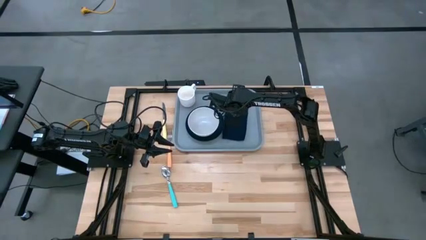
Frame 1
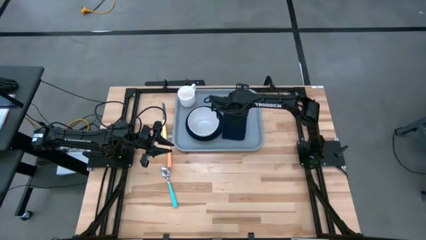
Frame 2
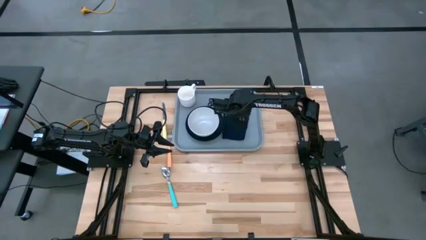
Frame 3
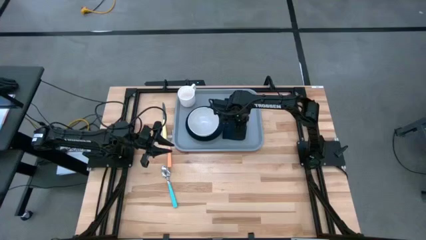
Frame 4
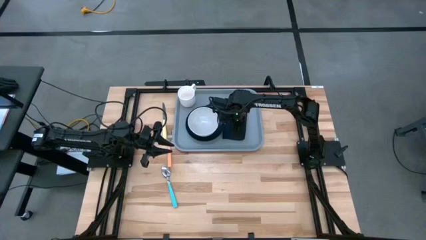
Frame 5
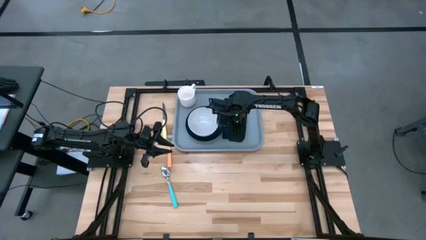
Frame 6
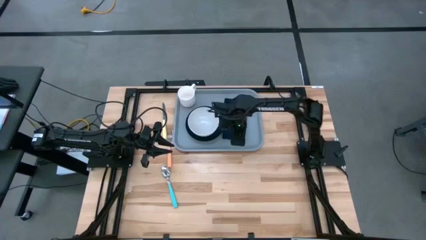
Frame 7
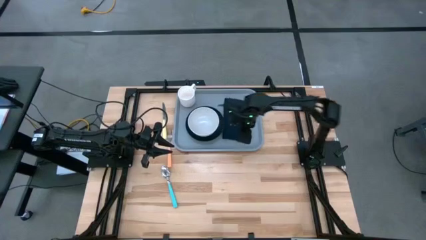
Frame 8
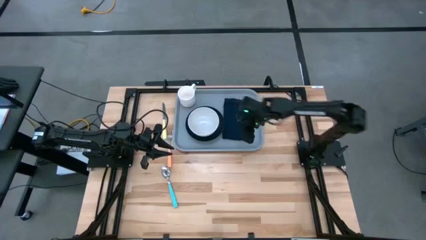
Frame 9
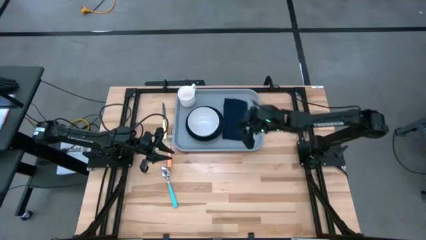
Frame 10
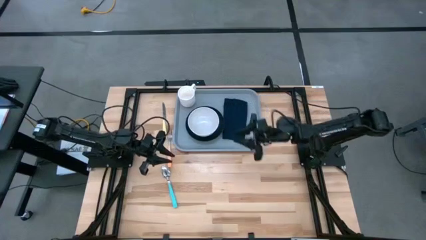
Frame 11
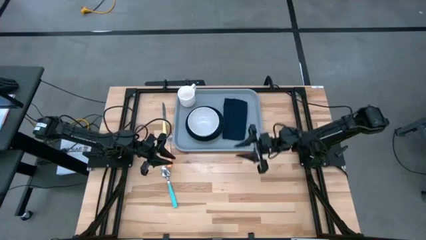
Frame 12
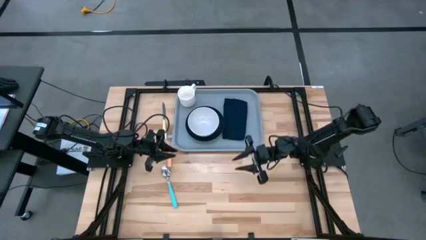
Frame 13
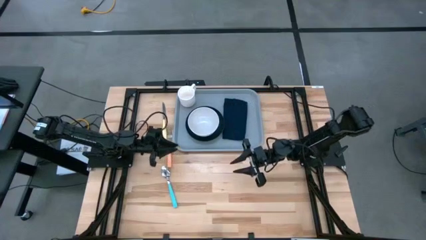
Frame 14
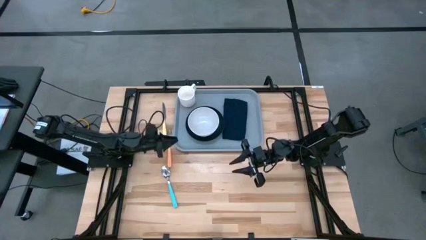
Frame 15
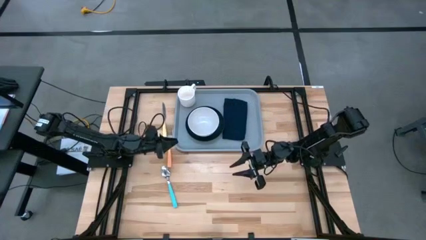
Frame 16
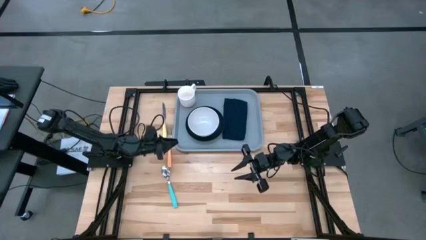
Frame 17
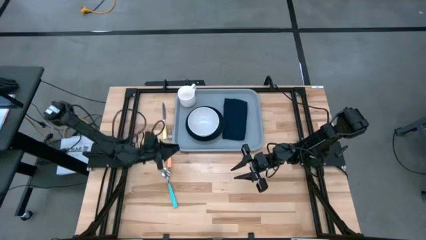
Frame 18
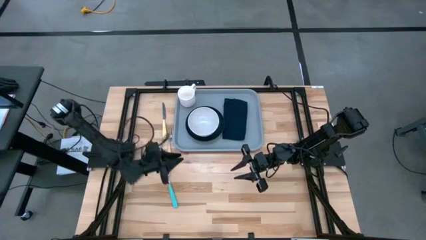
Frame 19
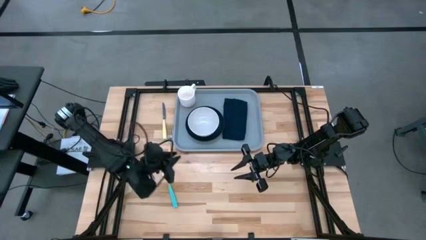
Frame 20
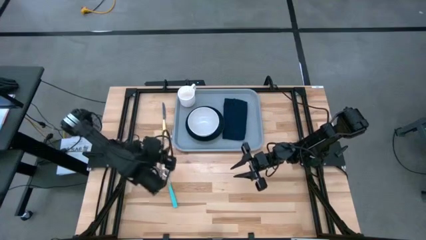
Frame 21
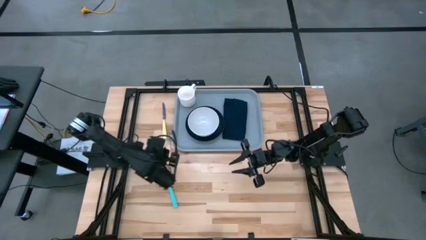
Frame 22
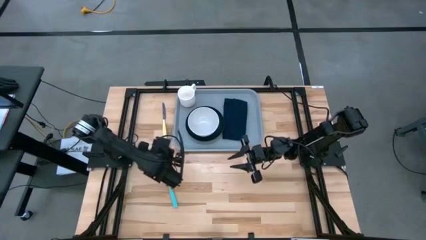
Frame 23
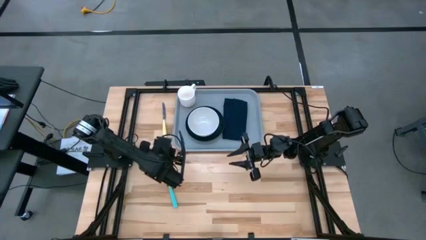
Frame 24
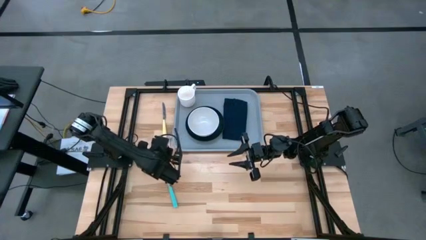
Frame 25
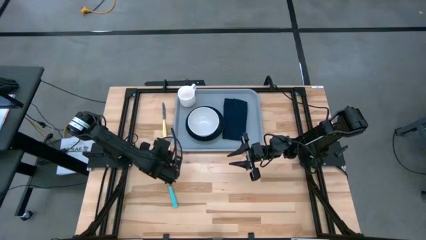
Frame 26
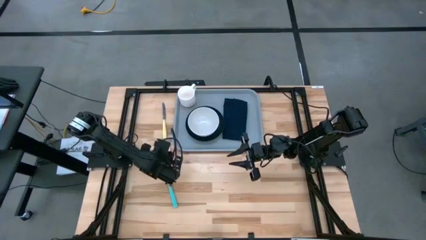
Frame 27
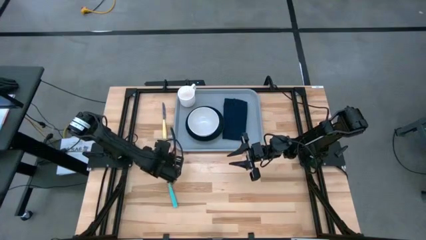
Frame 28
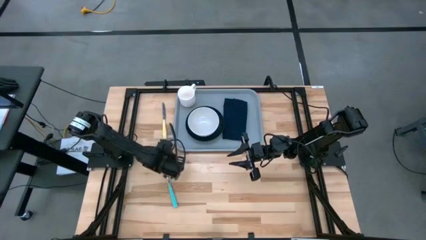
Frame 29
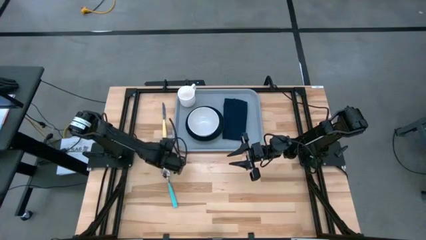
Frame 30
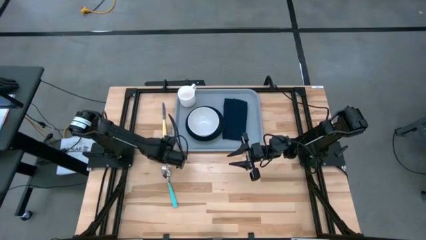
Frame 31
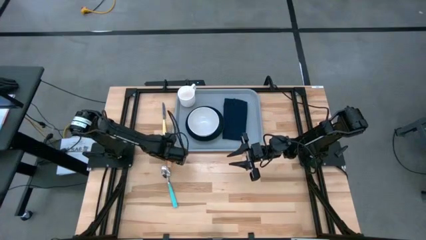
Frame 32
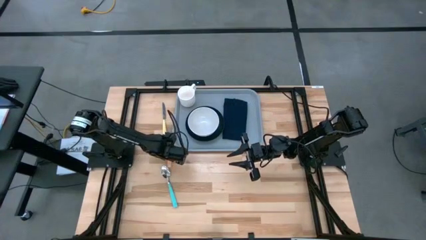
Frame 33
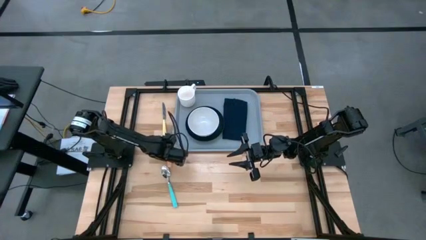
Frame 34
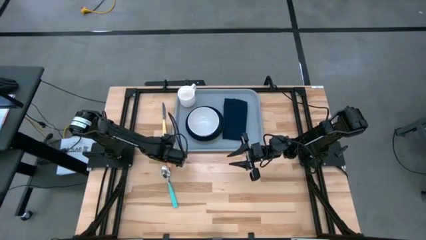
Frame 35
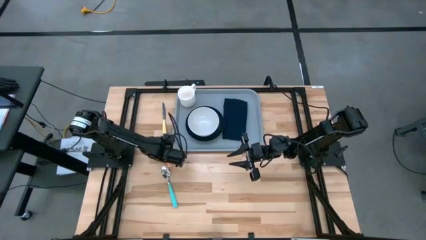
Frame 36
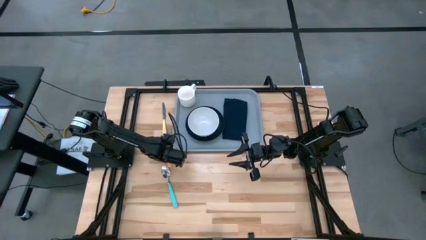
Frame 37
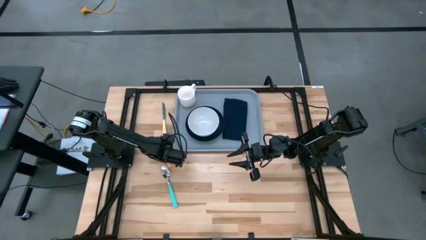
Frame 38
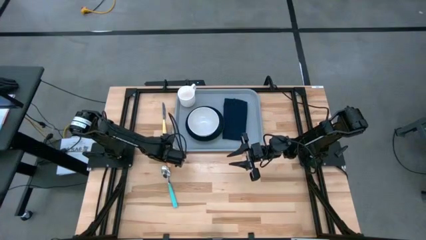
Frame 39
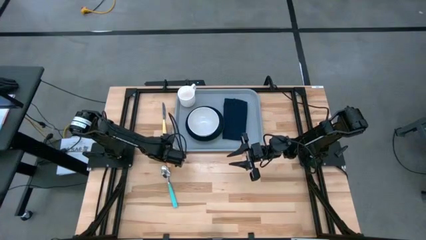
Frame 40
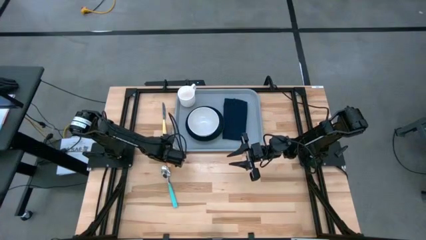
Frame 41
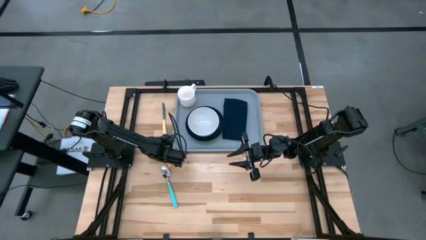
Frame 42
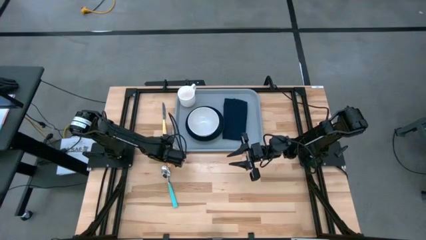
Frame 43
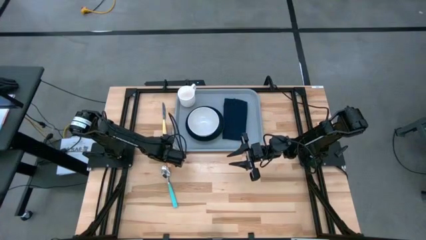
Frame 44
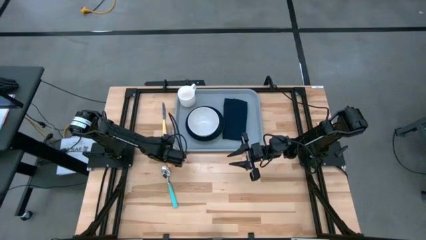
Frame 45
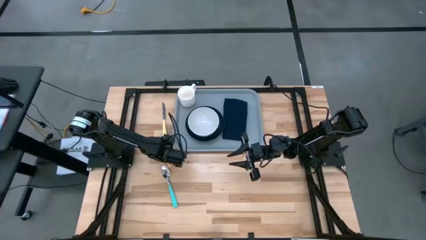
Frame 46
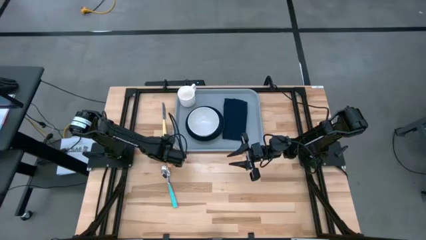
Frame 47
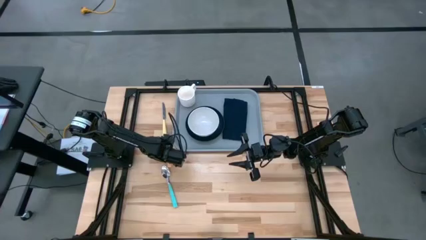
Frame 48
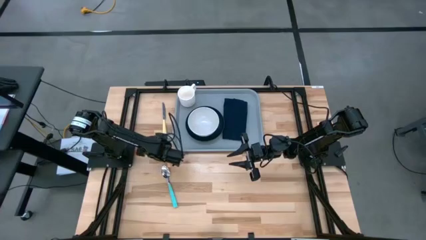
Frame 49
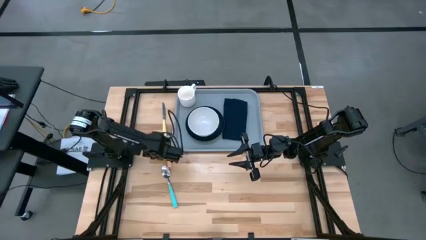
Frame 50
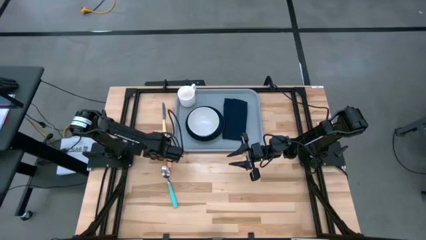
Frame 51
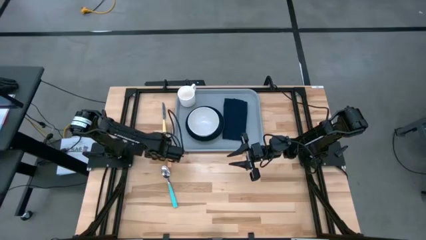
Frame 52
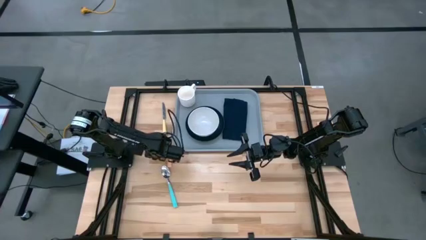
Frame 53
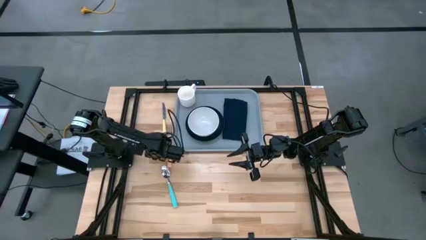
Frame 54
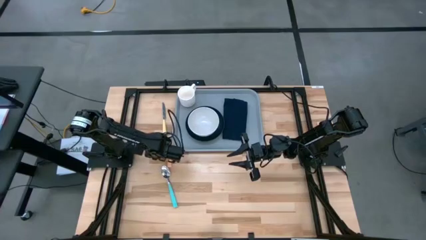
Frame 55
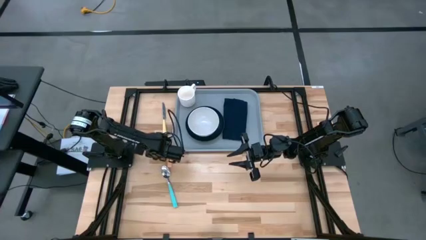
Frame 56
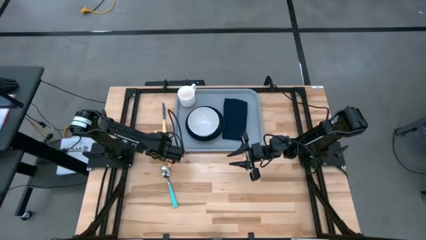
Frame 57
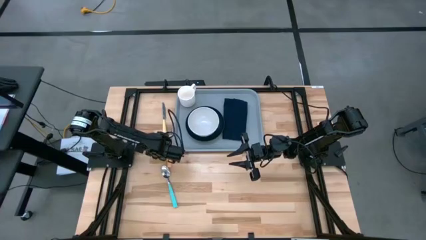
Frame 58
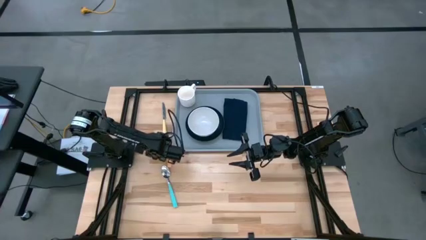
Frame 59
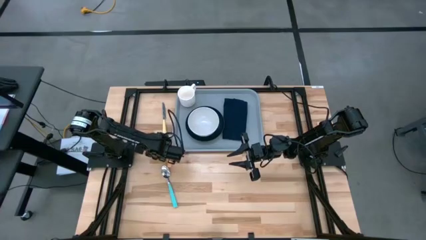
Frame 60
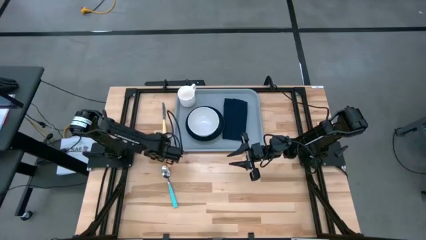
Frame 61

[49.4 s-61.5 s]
Task: Set up tray
Put the orange fork on top of the blue napkin on the gray tray

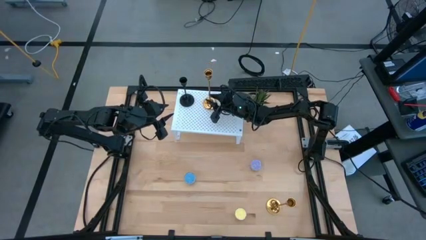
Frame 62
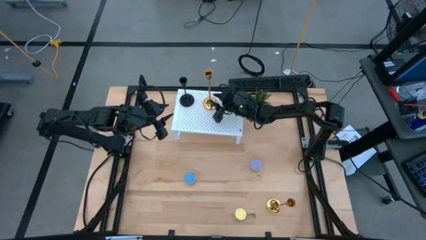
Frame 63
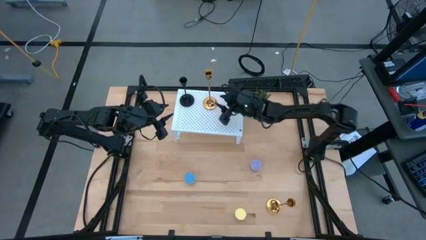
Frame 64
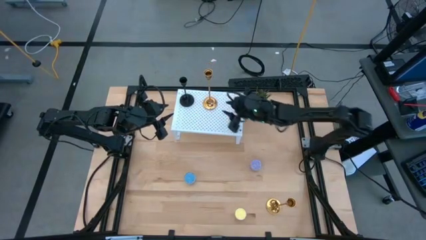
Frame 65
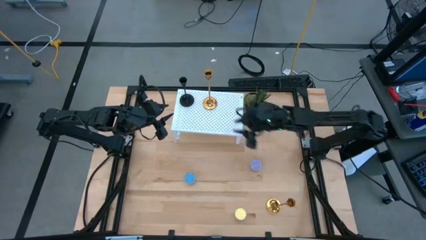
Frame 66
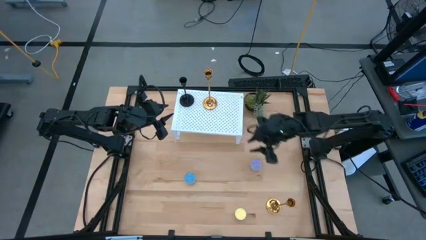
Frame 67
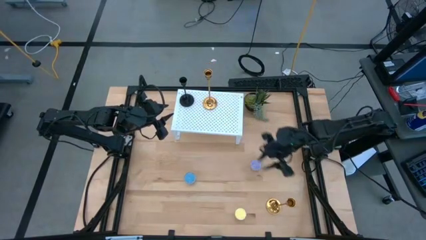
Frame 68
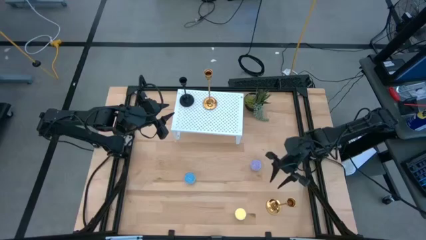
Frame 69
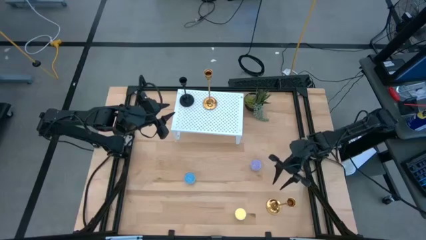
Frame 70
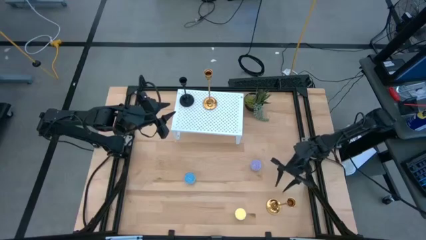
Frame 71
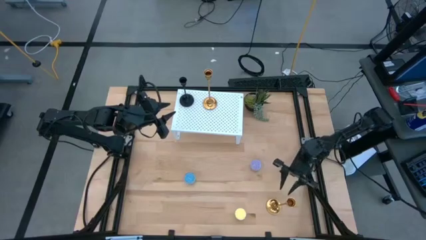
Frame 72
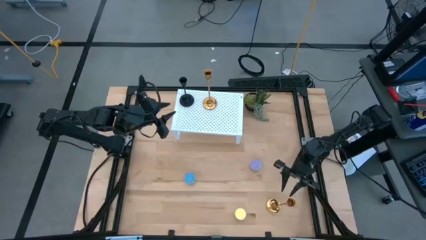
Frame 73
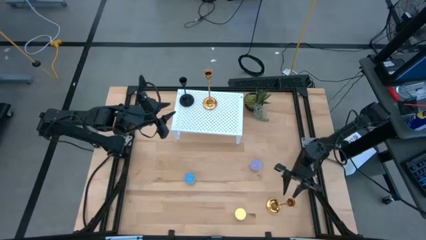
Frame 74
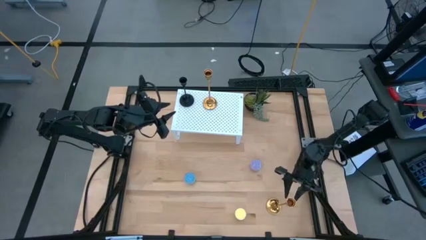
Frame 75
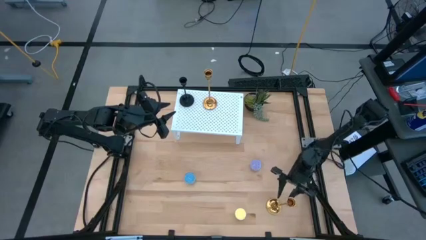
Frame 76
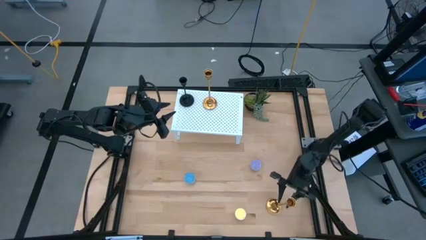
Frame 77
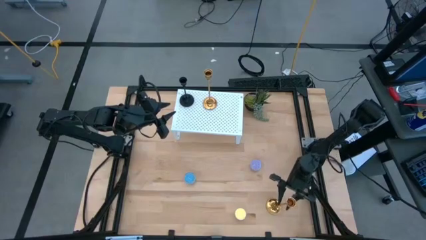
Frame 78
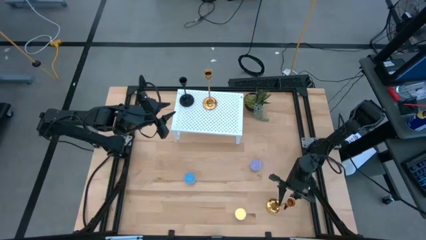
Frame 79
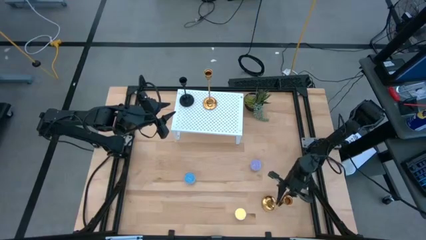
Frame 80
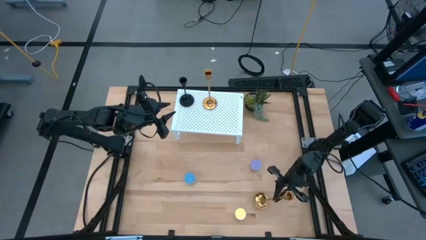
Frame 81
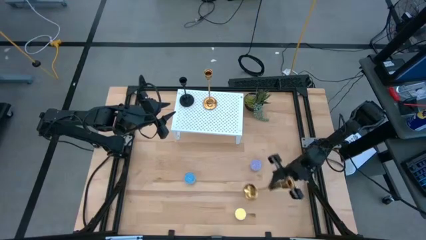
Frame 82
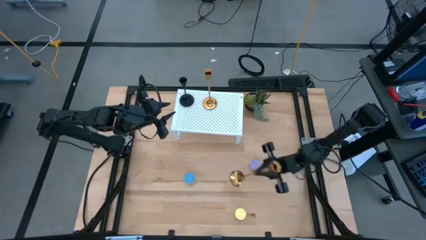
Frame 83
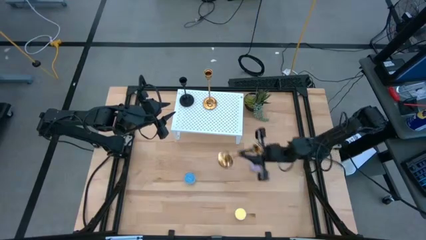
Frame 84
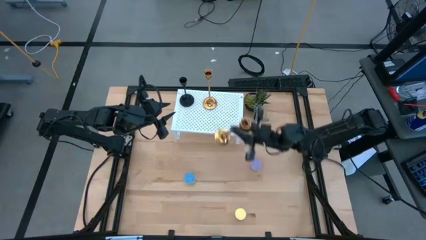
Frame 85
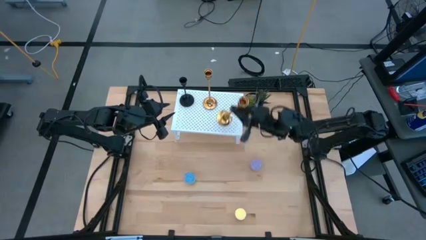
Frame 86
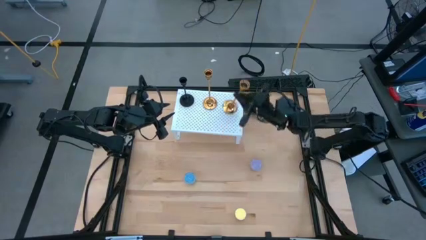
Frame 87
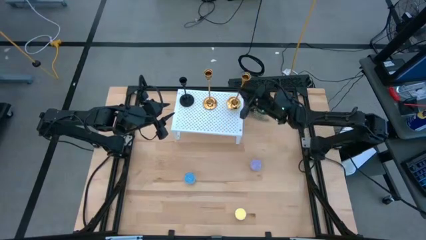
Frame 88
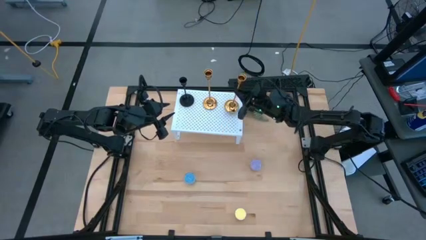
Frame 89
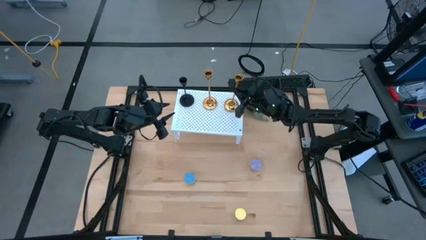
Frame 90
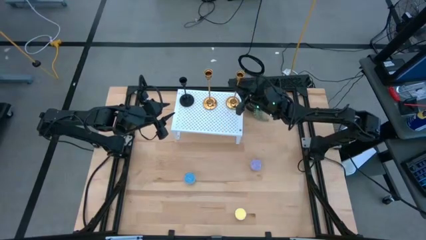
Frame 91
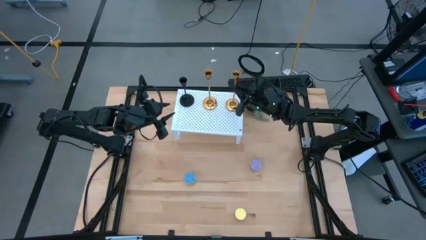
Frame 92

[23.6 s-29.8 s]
Task: Pick & Place candle stick holders
Put the gold candle holder on the shelf
